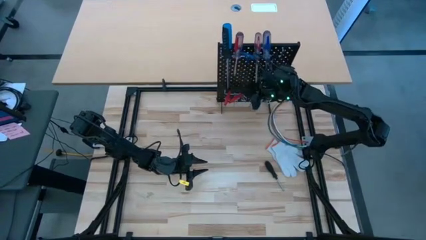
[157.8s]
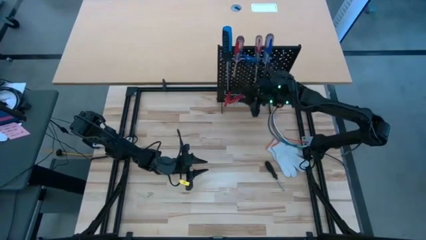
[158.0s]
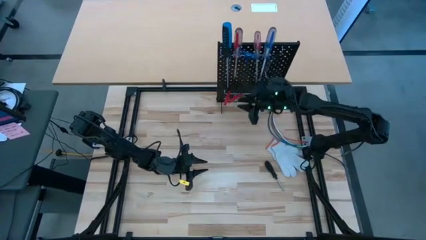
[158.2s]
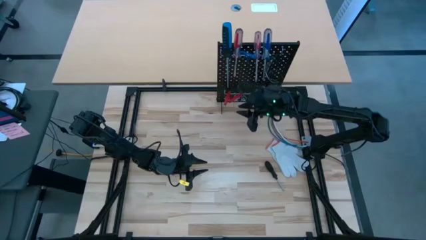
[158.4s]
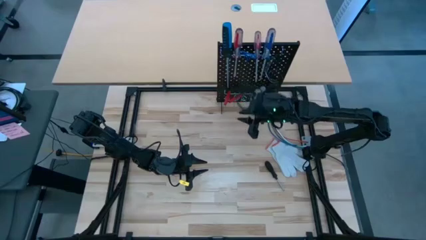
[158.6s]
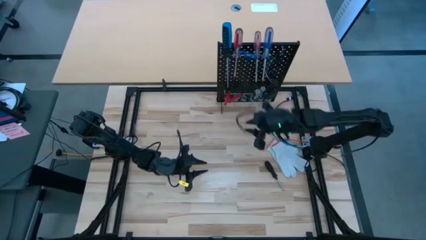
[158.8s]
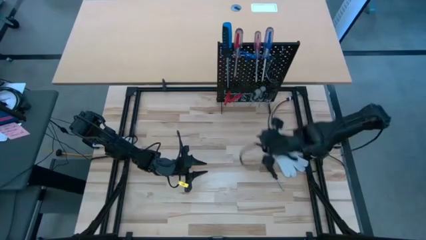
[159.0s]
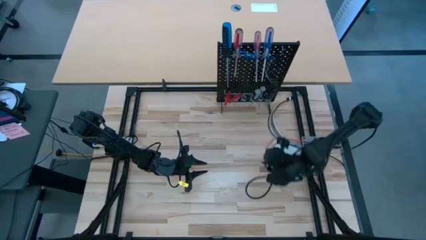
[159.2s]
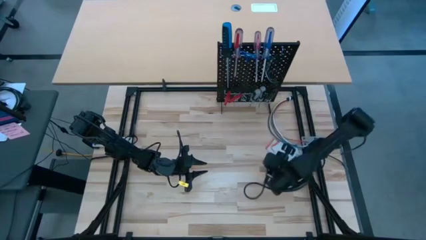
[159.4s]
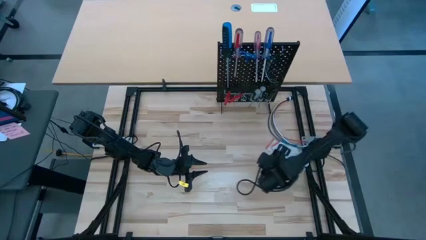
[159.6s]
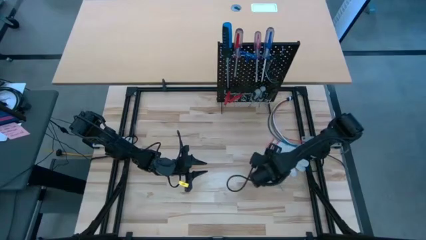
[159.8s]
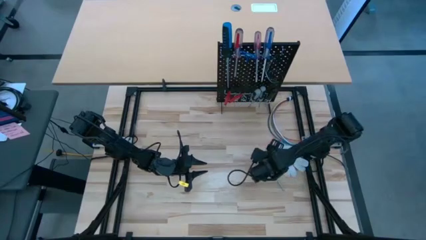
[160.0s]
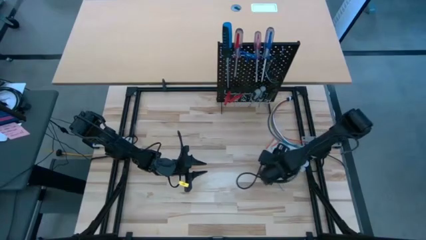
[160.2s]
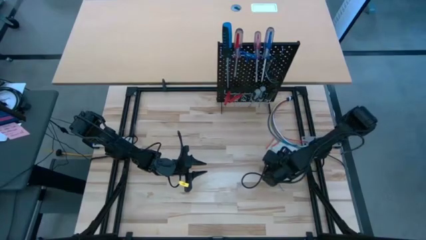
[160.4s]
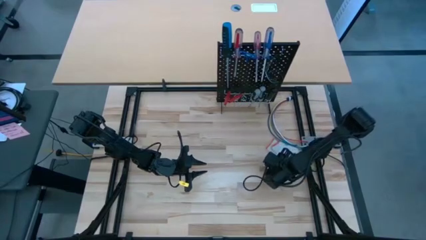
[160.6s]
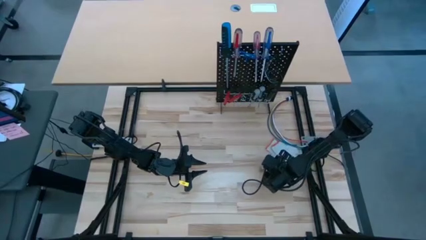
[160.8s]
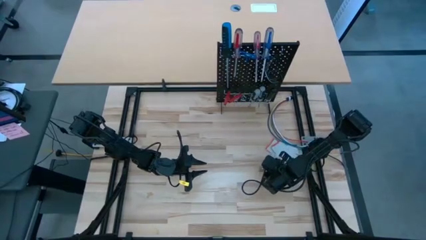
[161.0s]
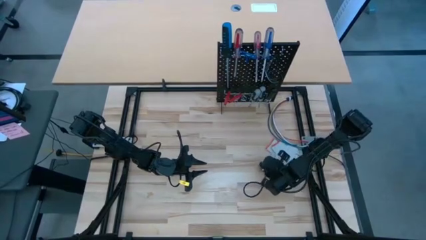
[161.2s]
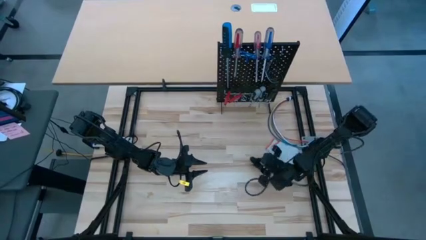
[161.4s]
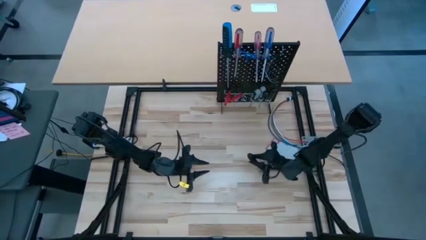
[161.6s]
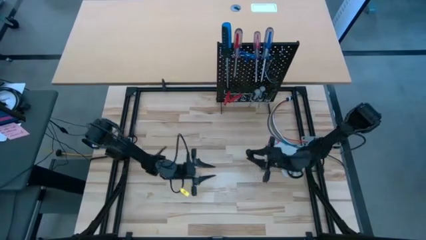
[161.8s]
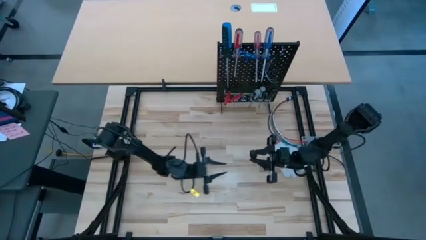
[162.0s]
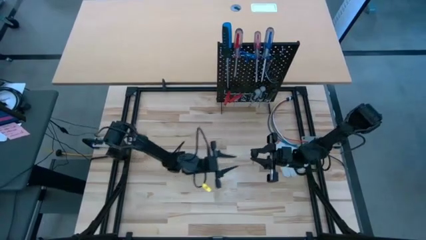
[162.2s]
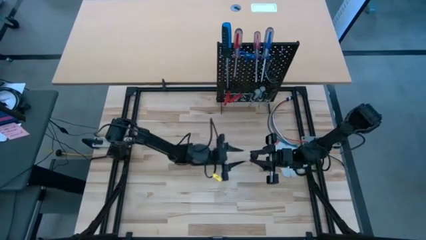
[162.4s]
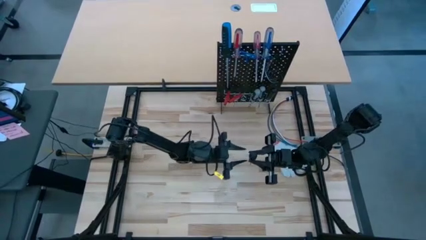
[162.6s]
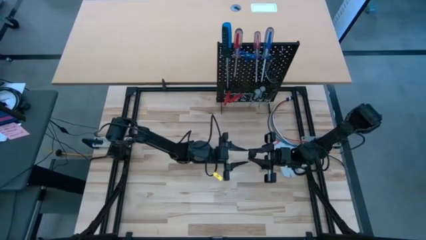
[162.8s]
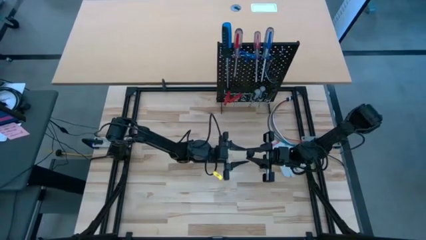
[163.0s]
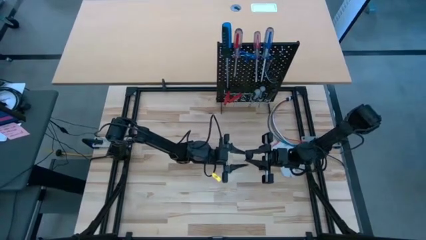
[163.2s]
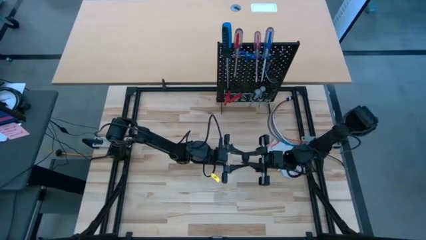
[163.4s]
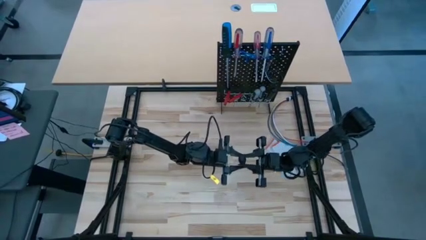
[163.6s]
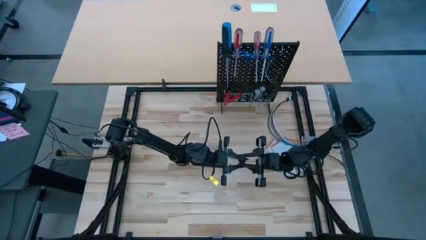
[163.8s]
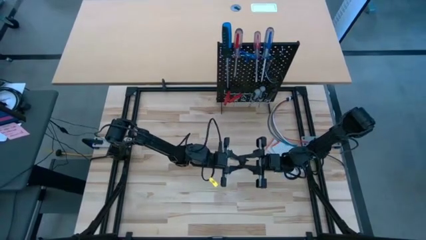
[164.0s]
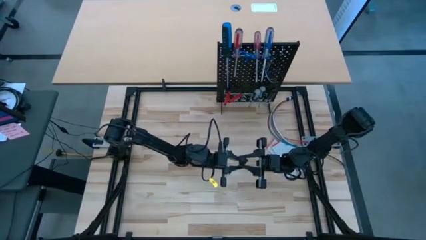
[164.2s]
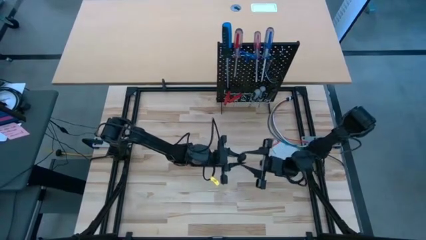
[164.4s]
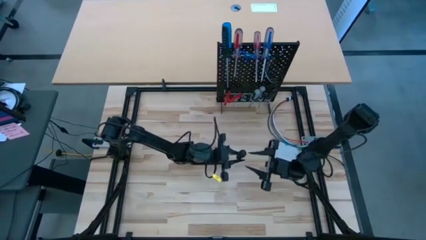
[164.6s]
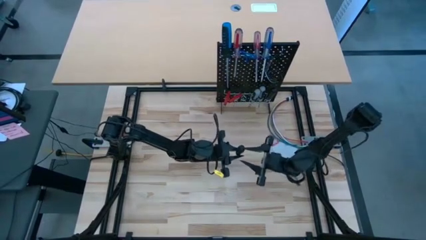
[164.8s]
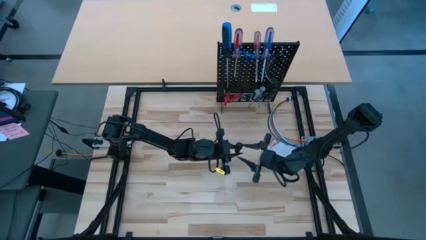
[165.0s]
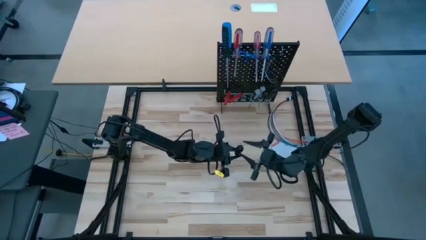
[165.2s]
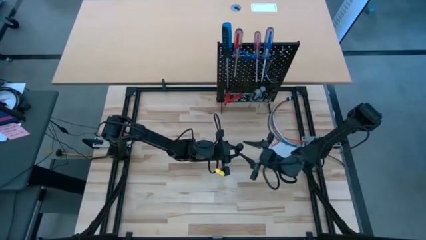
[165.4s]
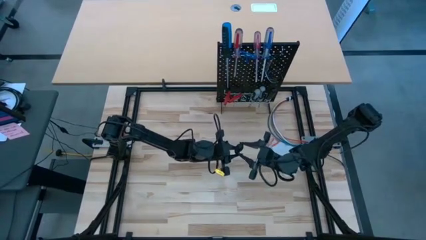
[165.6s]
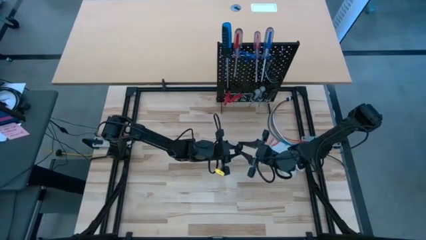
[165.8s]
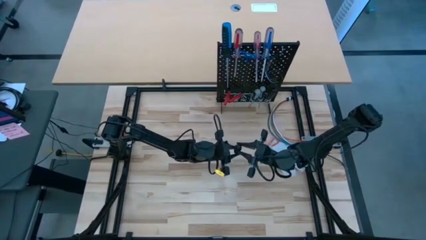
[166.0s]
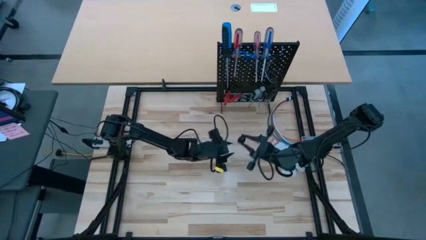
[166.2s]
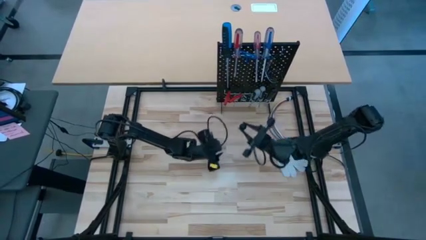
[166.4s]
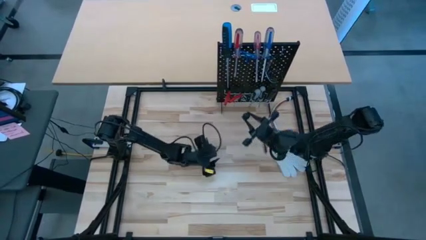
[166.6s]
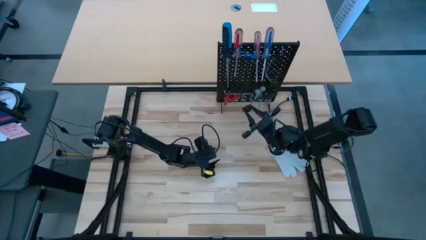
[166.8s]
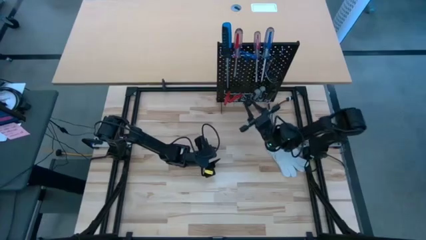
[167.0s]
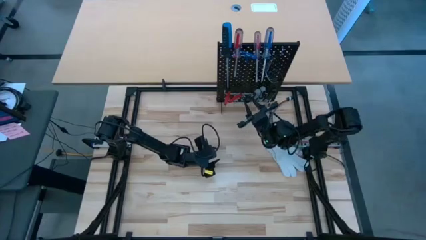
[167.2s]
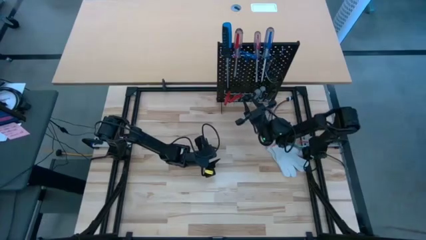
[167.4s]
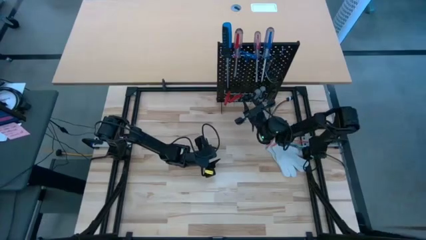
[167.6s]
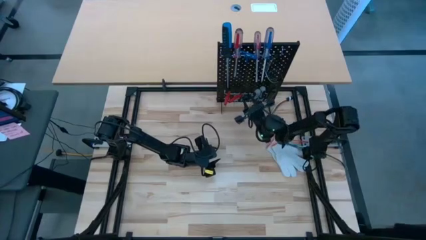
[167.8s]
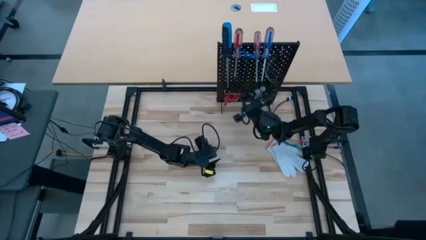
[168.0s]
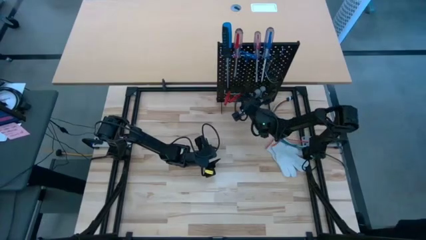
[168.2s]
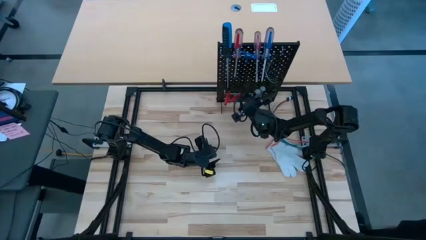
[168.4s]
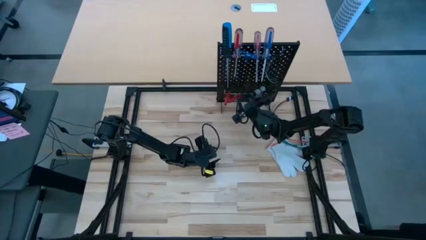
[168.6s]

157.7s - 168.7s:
Task: Hang tools onto peg board
Hang the black screwdriver on the pegboard

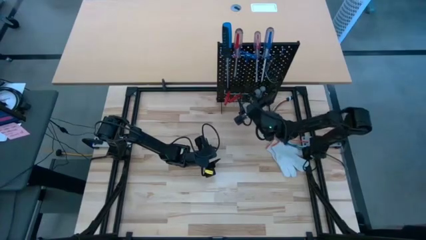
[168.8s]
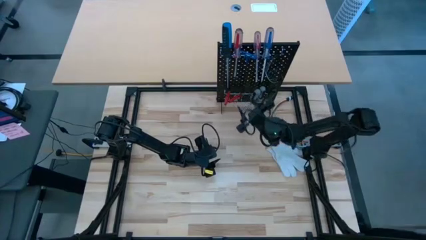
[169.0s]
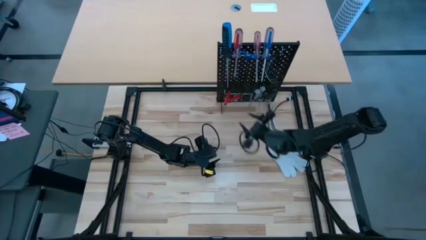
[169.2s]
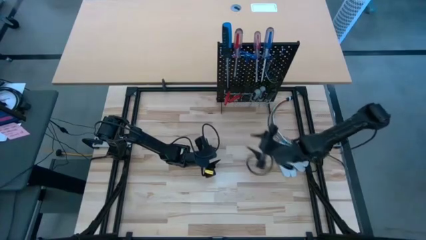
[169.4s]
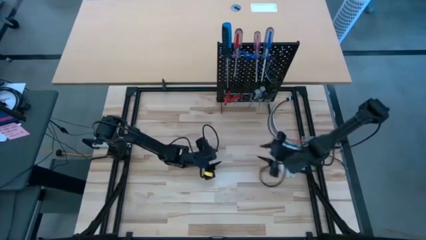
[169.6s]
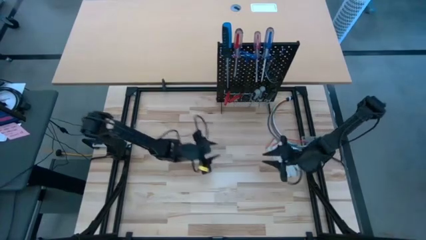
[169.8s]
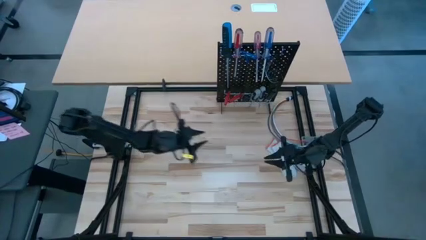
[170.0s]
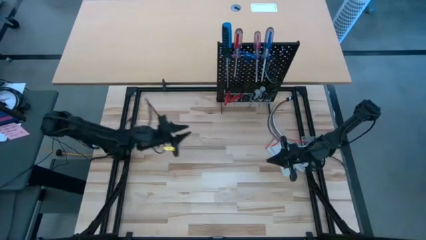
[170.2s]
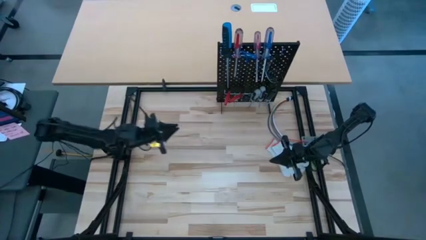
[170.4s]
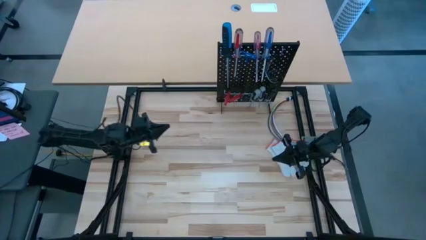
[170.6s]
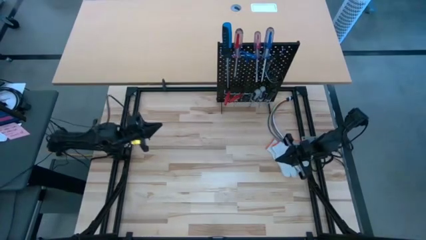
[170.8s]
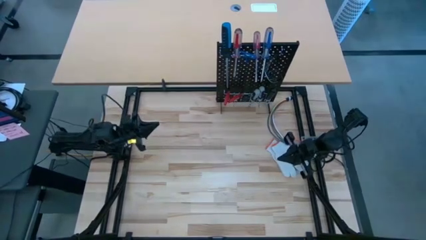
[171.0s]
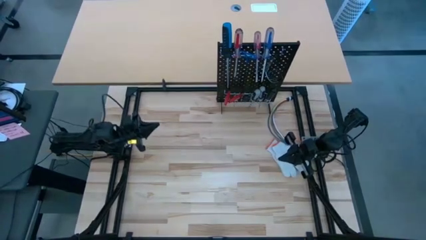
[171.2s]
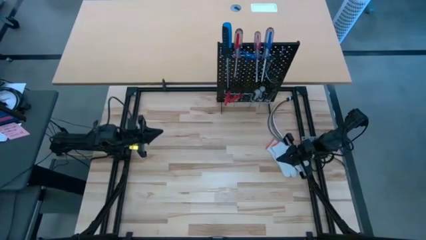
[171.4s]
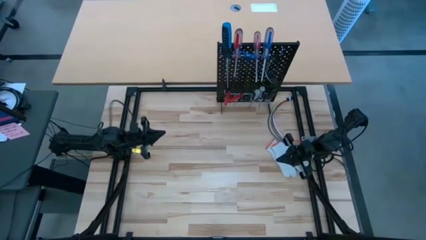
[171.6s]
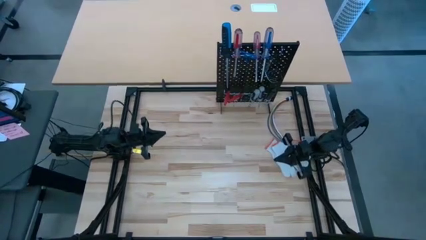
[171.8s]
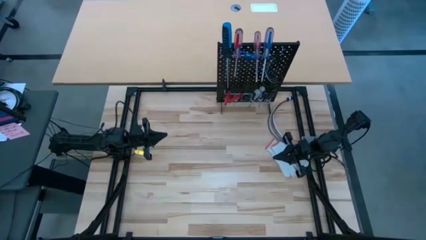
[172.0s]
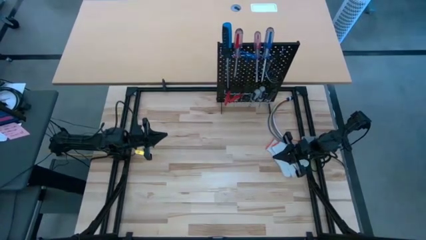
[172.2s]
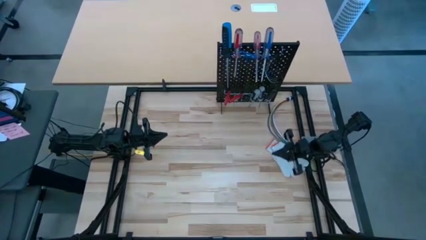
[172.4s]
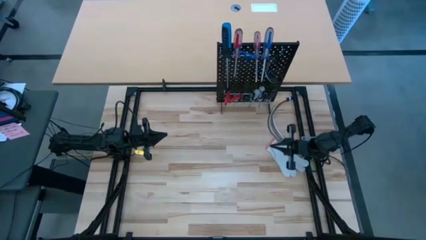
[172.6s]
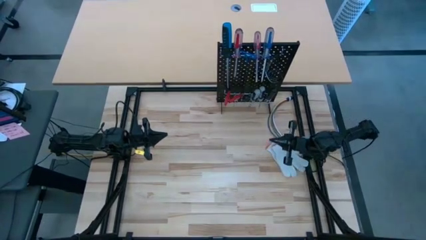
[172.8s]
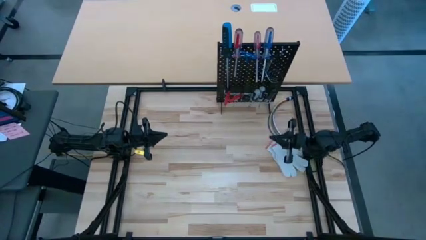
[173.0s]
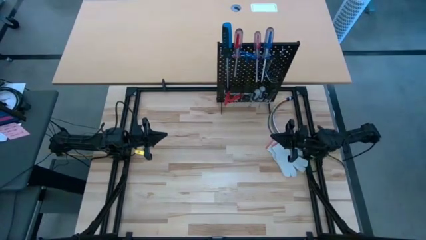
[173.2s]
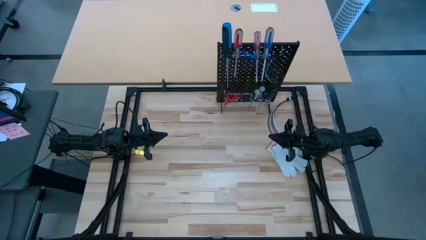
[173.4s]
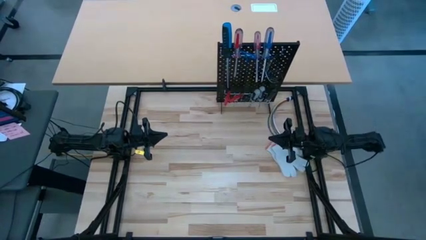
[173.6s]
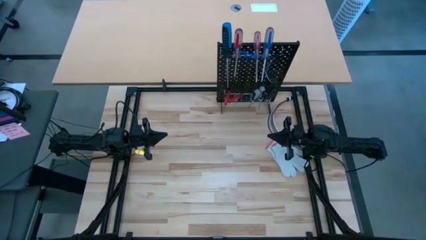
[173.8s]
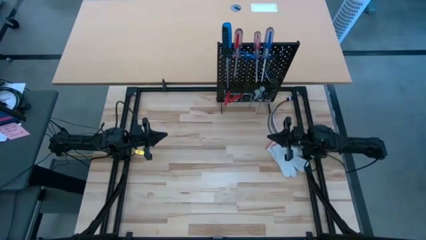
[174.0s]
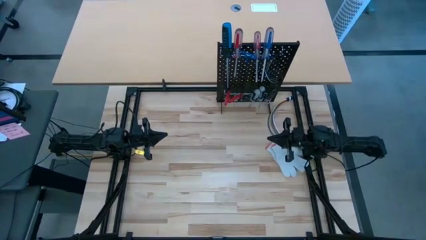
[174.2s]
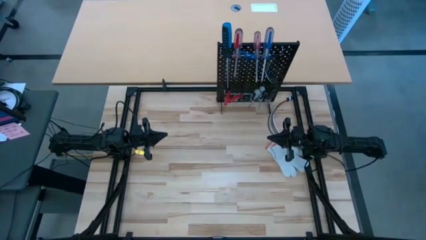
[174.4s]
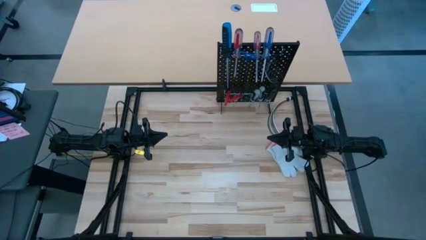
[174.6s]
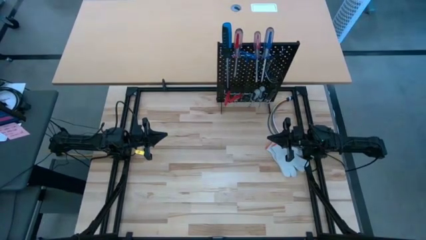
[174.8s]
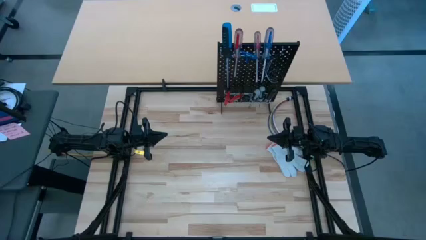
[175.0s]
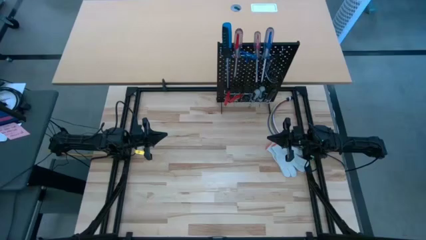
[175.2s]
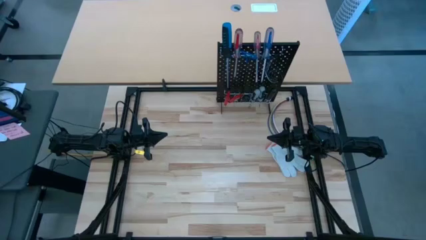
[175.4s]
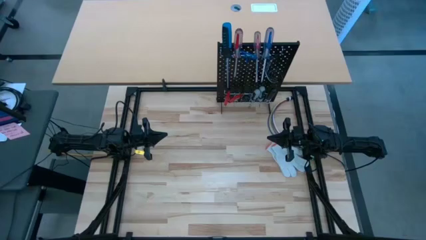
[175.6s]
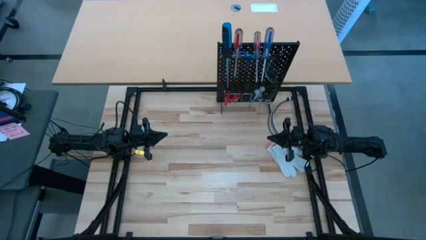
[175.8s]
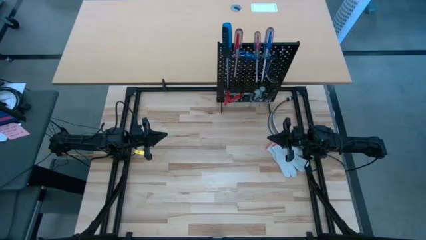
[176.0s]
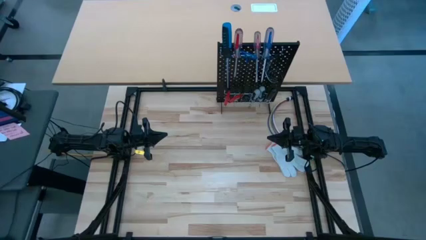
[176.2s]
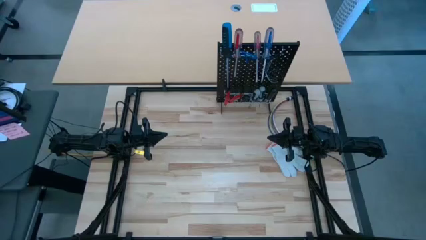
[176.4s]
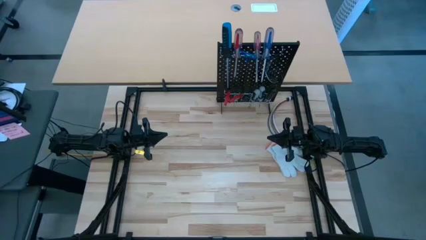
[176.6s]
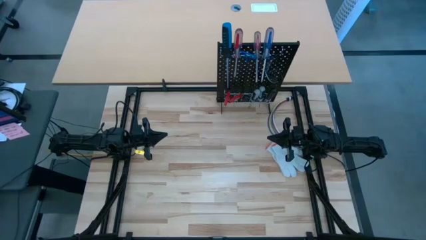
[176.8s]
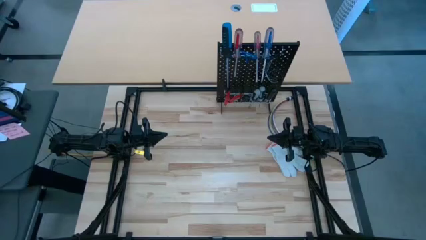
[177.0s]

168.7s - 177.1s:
Return to Home Position
